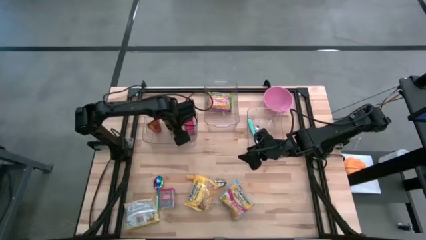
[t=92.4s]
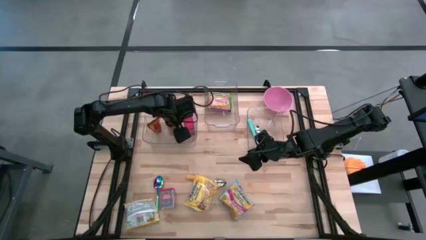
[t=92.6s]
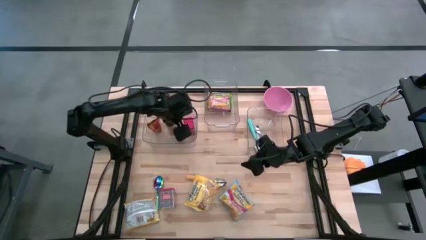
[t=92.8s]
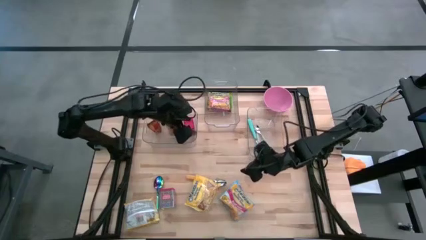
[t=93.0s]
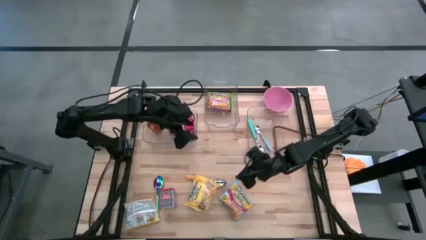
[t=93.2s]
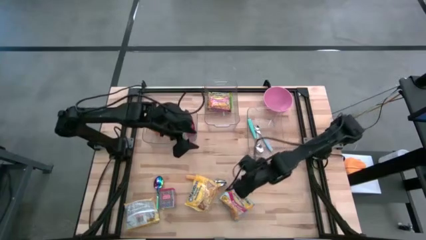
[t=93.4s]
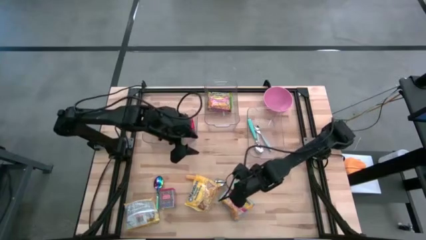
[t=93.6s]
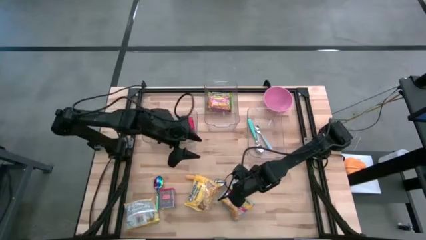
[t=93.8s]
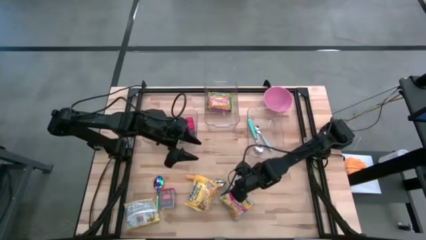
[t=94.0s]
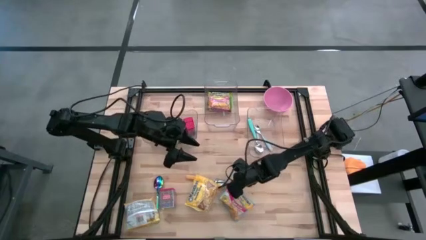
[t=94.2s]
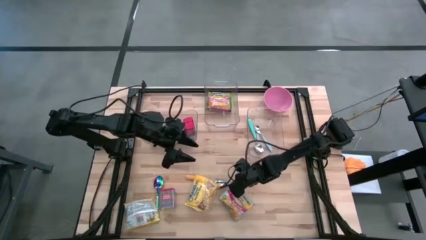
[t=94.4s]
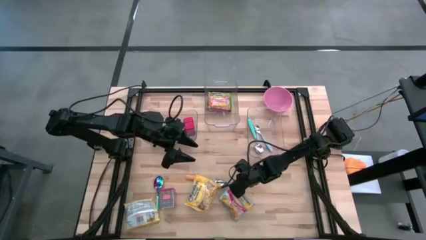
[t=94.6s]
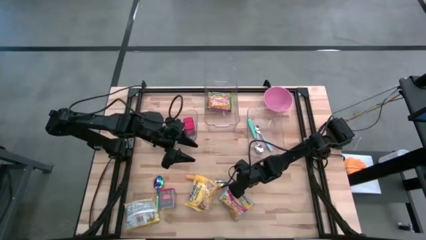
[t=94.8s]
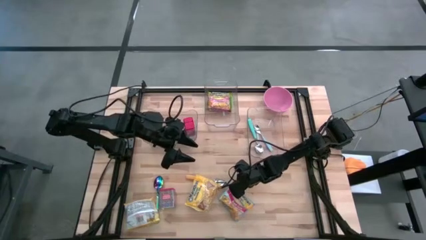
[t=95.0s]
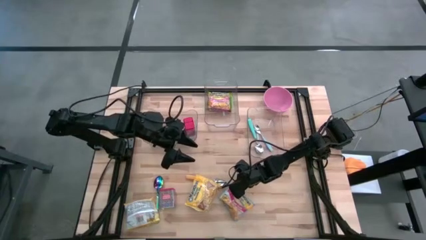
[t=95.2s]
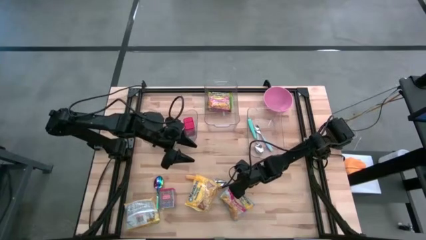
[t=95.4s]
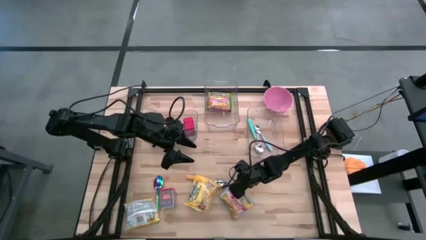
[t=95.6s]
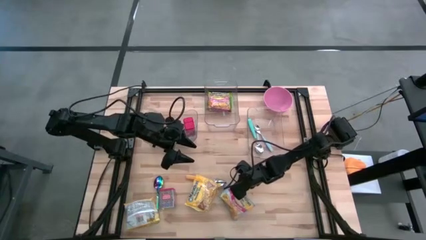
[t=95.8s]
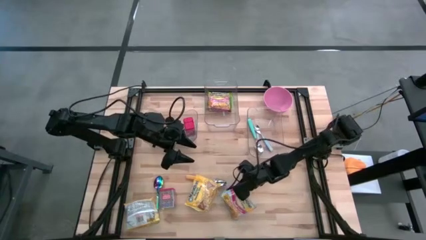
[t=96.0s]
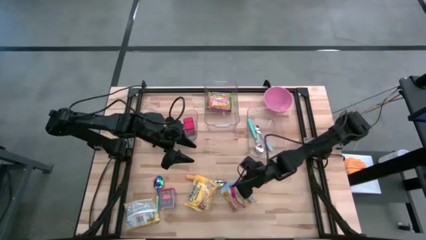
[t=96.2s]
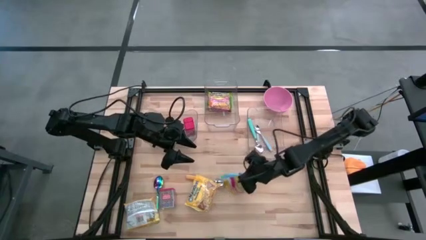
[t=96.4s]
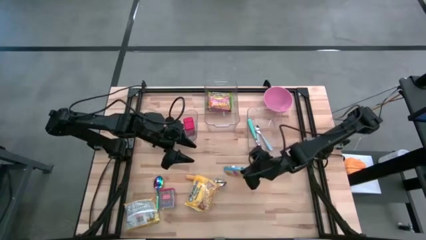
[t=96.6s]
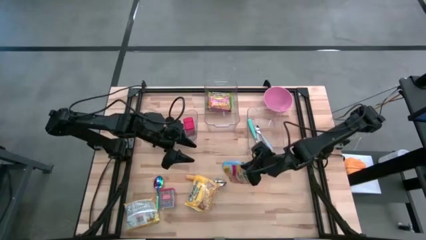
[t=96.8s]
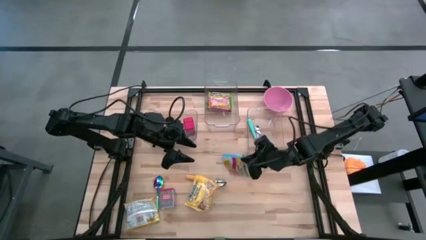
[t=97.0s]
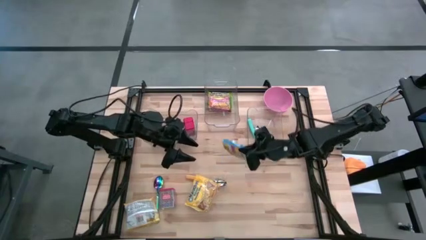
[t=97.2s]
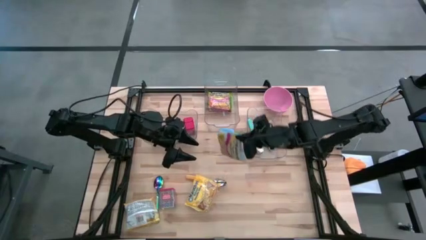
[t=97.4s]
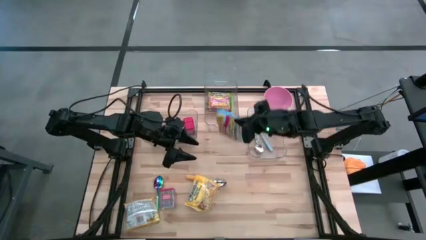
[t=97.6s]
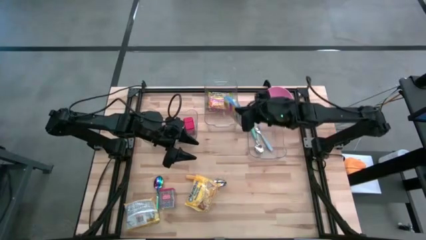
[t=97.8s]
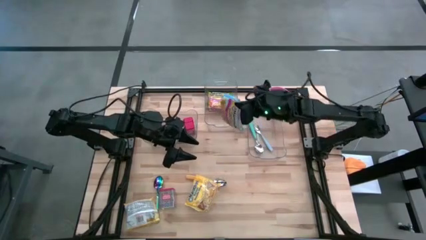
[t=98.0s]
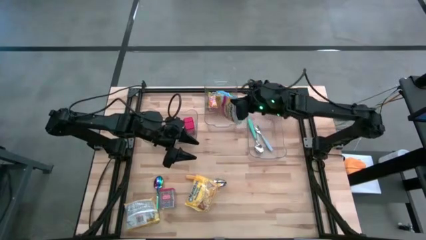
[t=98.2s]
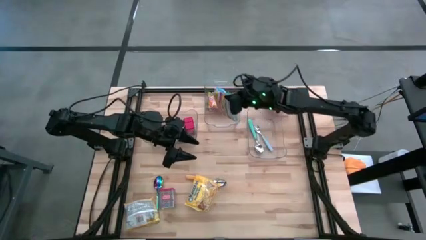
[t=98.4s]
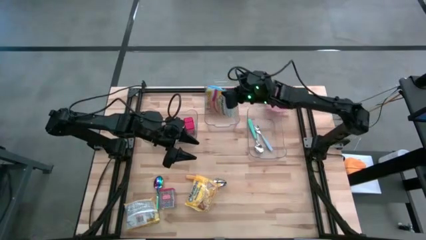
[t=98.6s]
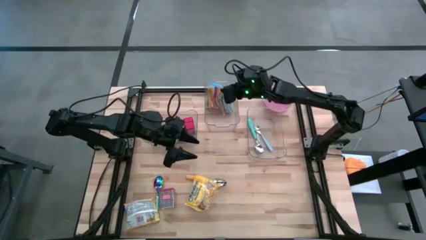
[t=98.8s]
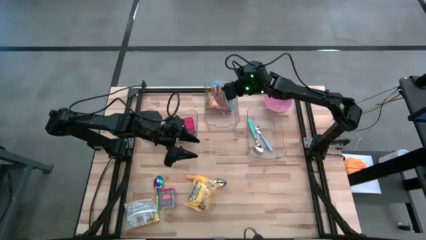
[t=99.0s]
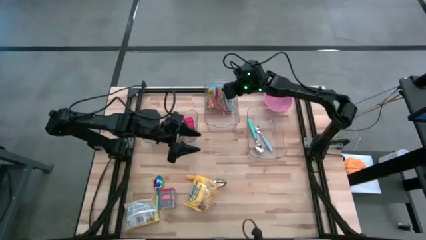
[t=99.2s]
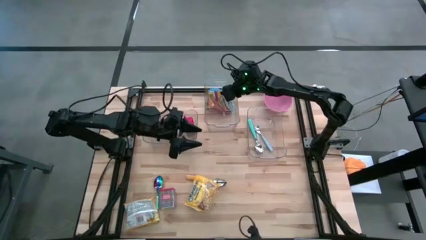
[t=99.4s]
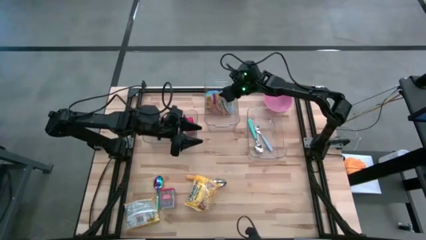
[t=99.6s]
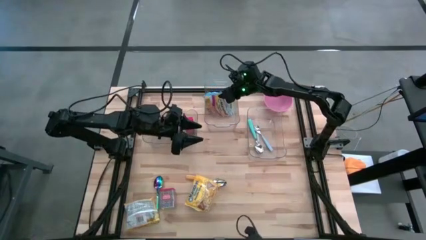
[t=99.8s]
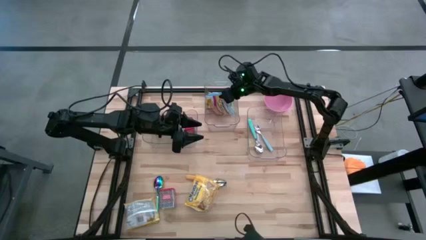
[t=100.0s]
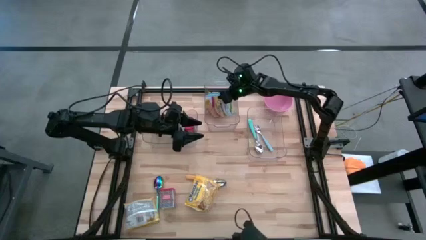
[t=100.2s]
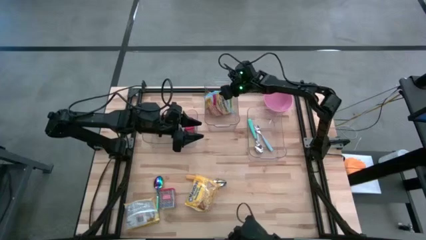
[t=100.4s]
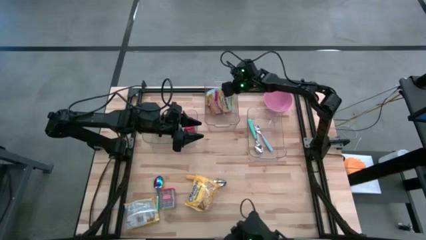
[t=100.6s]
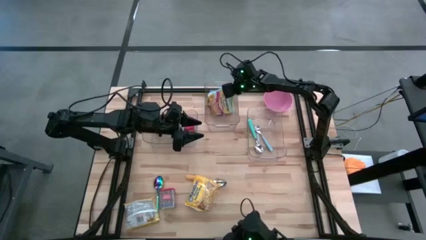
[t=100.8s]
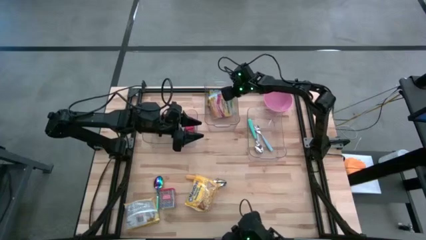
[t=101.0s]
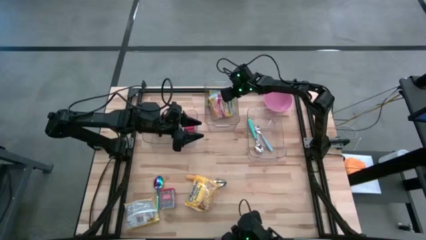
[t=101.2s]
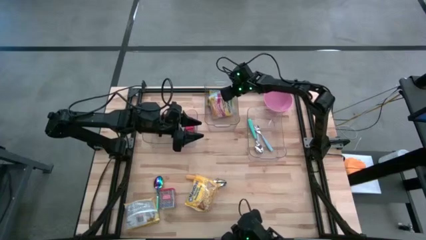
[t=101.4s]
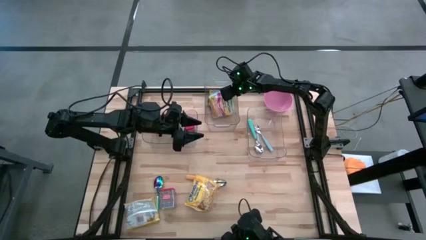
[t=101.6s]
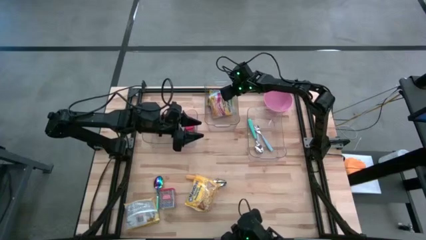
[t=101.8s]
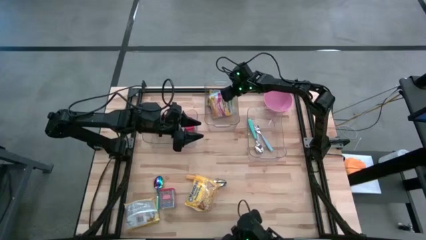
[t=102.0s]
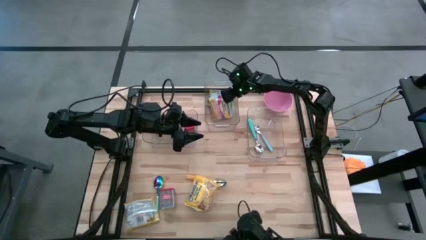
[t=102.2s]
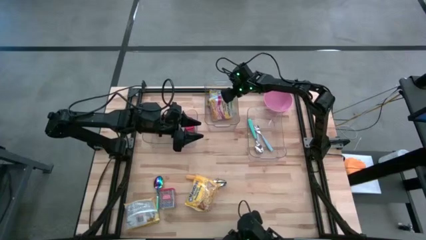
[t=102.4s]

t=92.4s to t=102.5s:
Put the blue noodle pack into the middle transparent bin

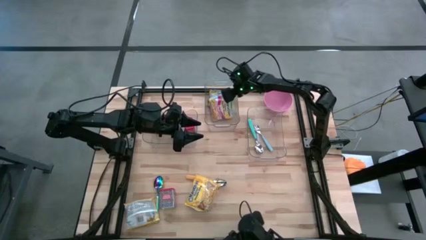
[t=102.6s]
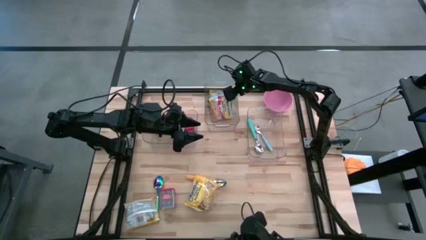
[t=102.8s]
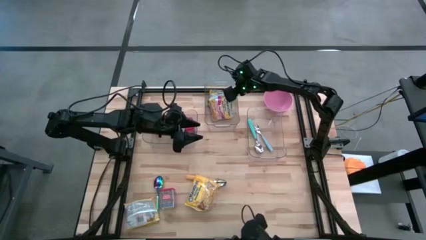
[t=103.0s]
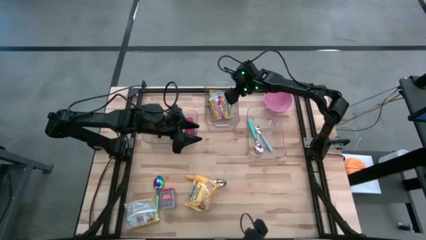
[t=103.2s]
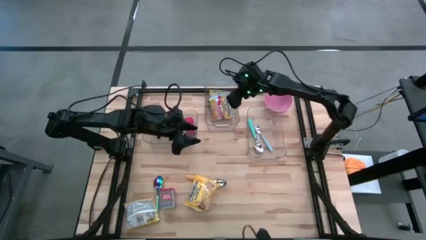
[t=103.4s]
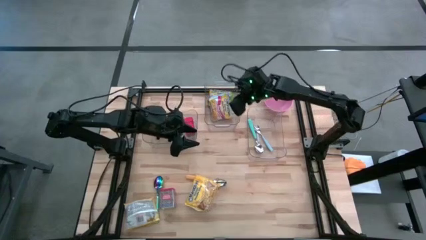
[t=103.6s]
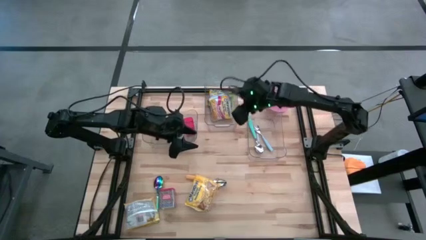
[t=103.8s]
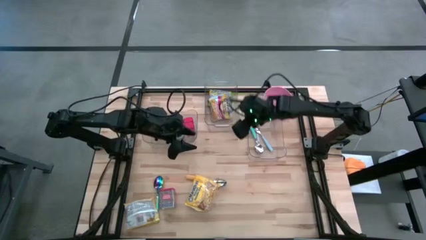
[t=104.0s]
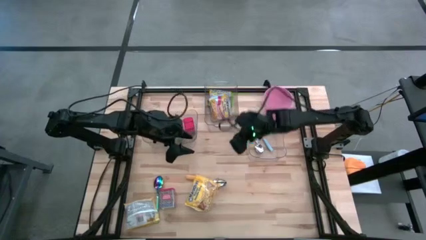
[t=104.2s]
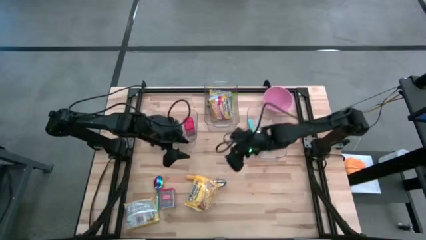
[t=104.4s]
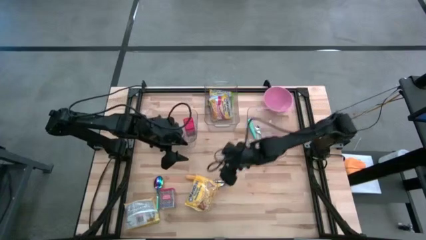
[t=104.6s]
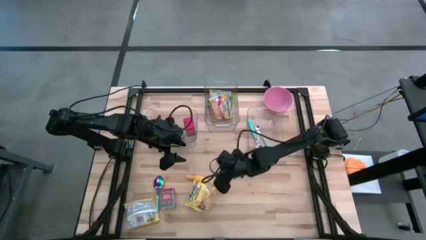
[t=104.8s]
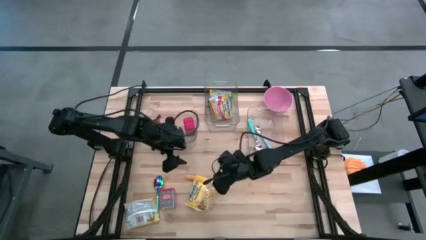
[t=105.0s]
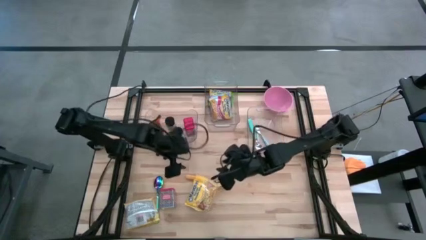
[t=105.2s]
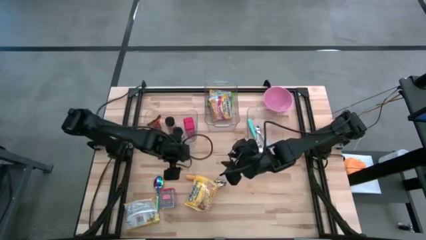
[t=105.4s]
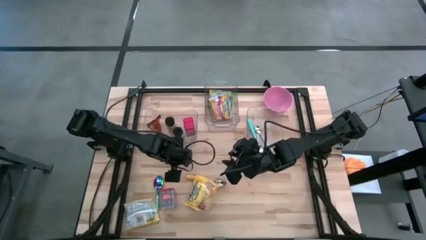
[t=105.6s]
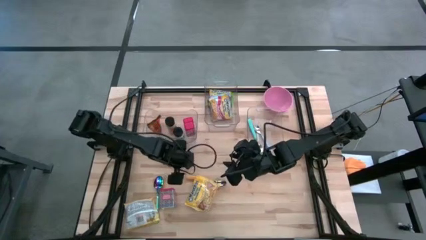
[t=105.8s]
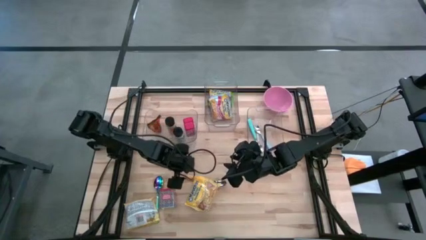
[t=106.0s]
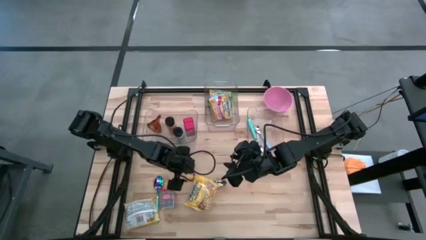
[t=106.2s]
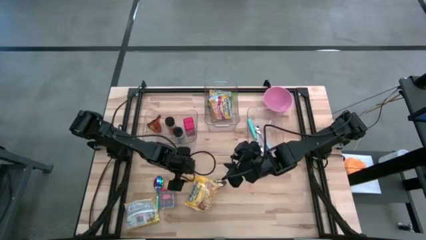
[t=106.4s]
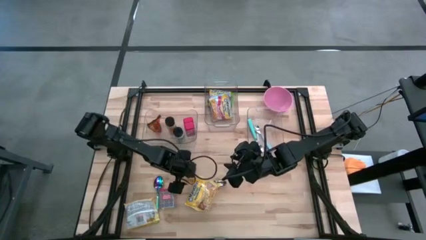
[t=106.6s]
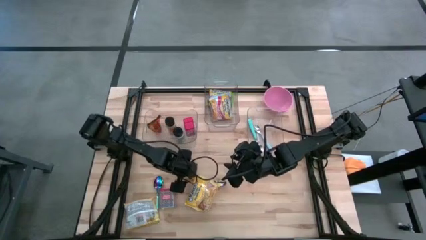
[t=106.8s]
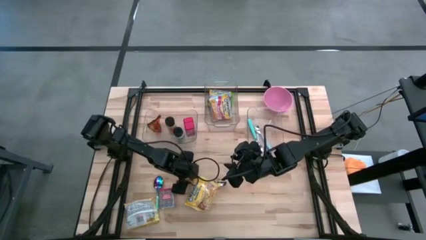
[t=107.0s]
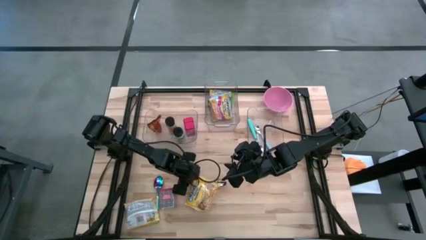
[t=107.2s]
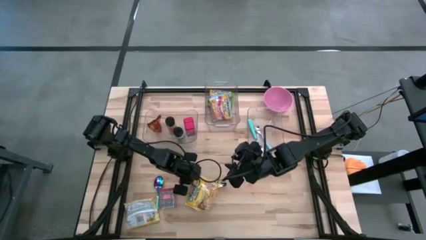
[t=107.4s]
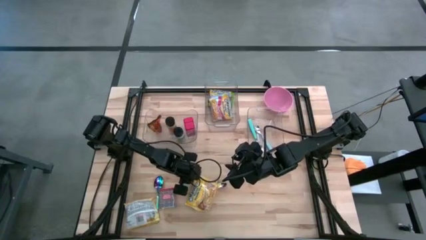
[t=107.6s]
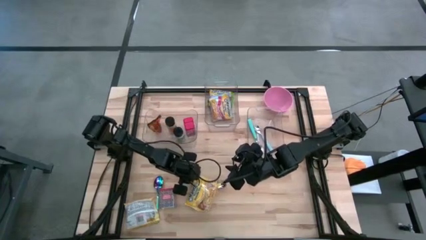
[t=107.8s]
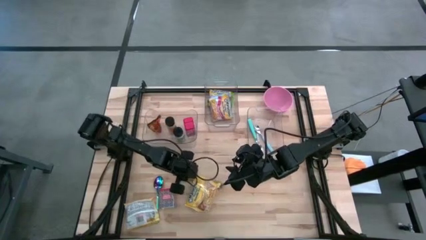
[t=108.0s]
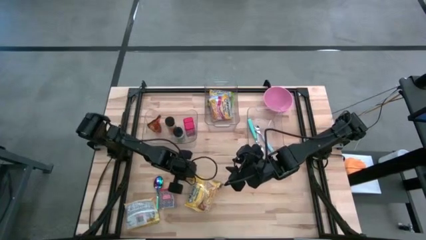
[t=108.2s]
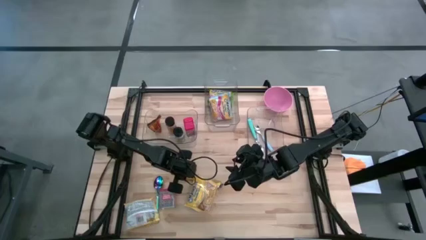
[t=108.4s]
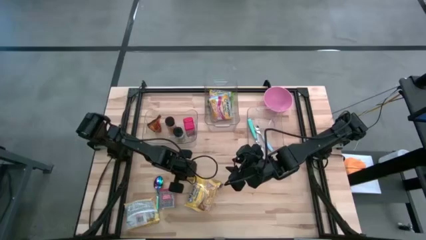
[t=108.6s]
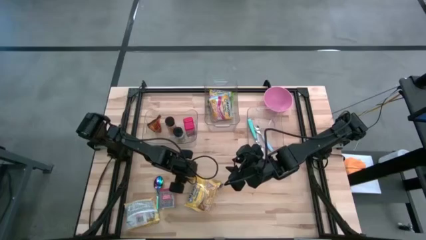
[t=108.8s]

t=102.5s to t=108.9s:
Put the right yellow noodle pack into the middle transparent bin
